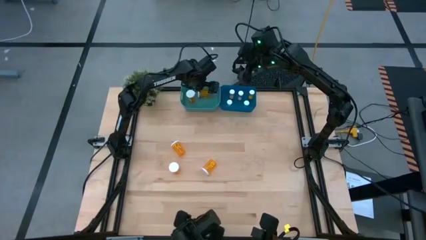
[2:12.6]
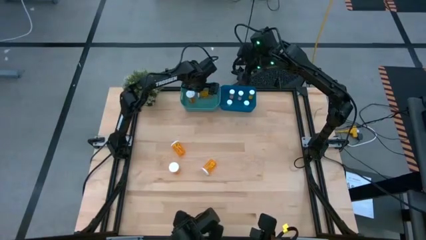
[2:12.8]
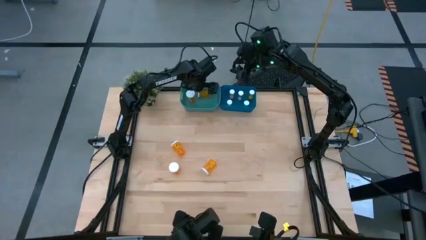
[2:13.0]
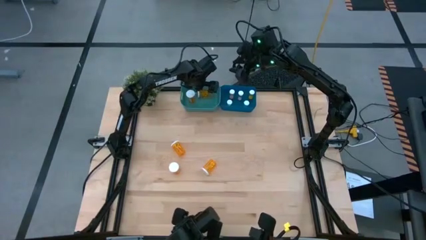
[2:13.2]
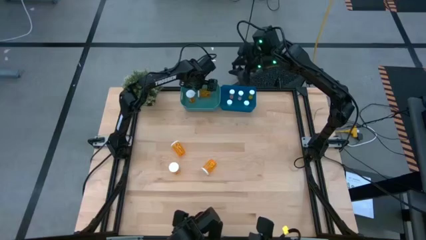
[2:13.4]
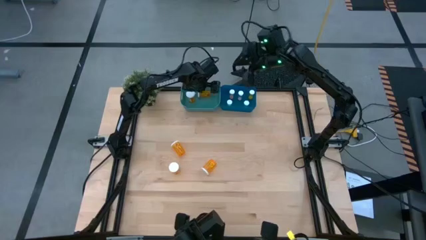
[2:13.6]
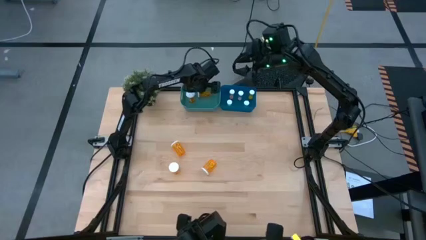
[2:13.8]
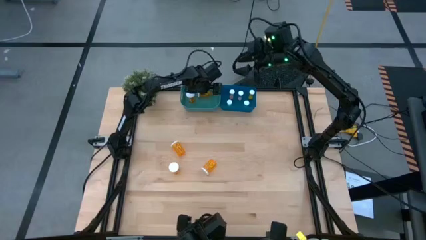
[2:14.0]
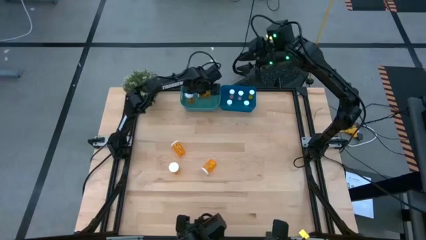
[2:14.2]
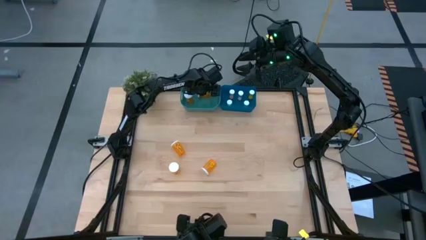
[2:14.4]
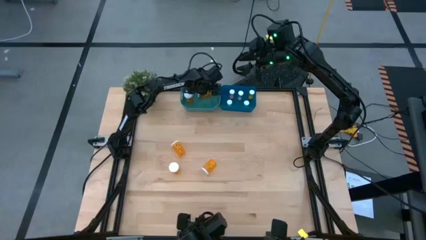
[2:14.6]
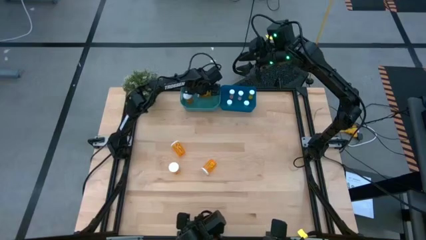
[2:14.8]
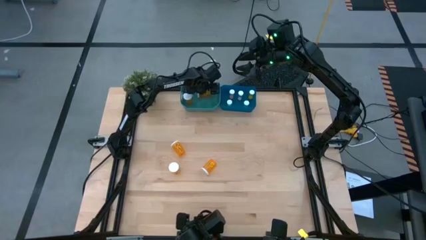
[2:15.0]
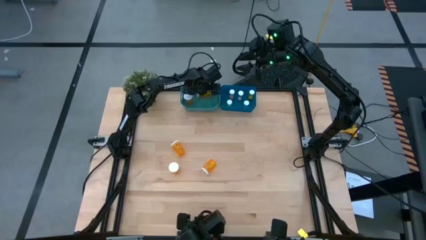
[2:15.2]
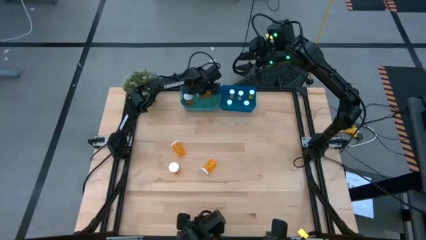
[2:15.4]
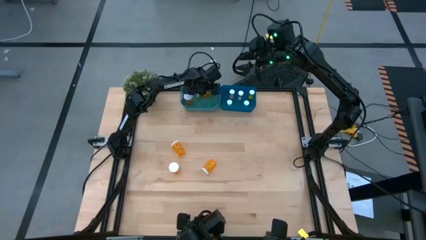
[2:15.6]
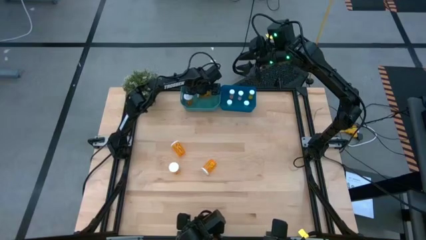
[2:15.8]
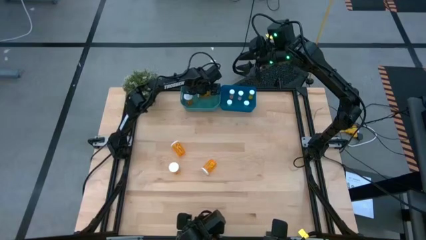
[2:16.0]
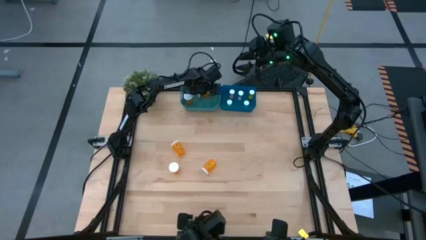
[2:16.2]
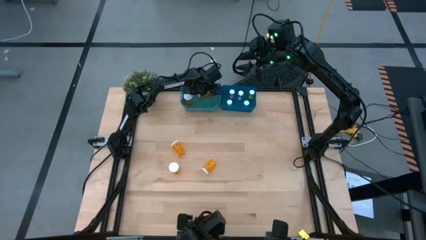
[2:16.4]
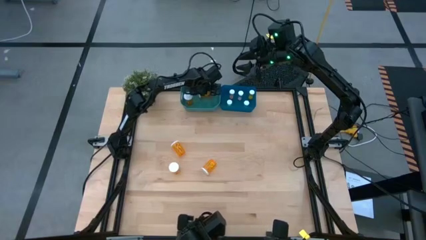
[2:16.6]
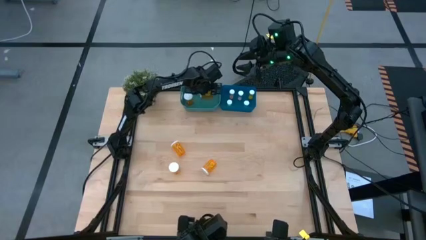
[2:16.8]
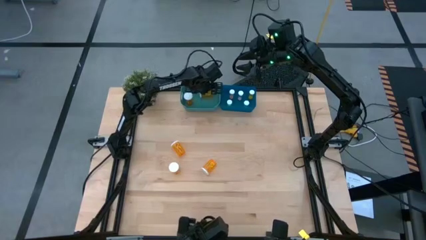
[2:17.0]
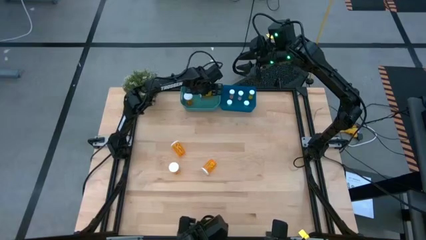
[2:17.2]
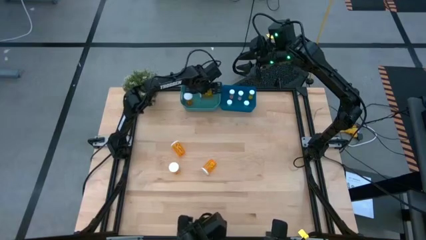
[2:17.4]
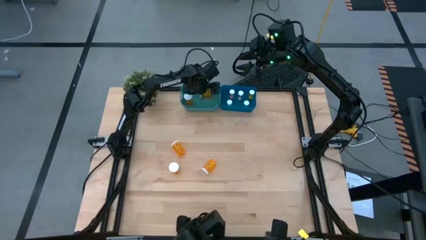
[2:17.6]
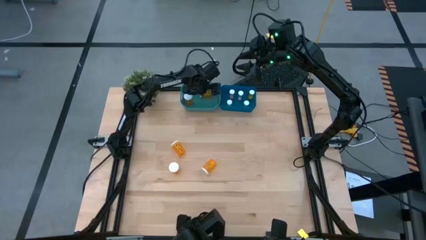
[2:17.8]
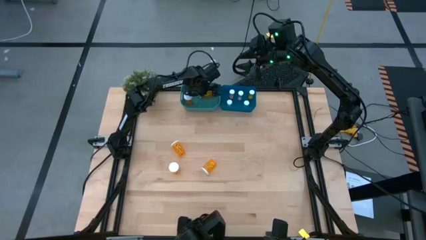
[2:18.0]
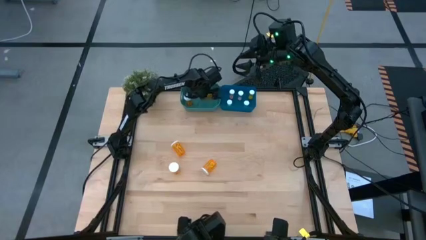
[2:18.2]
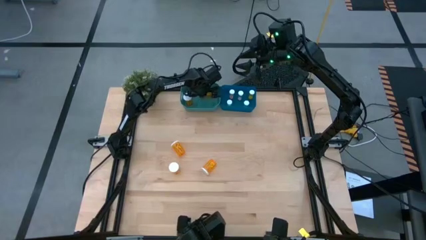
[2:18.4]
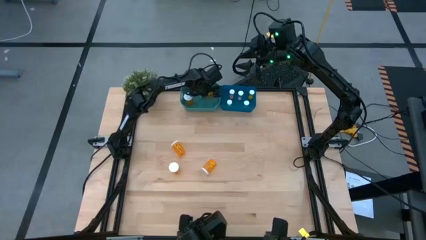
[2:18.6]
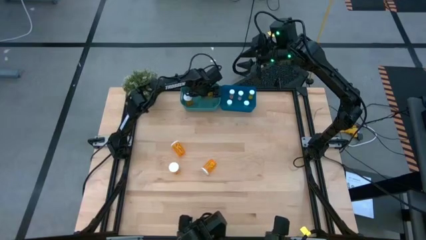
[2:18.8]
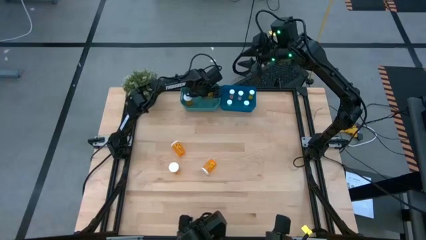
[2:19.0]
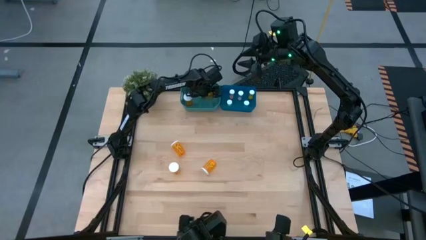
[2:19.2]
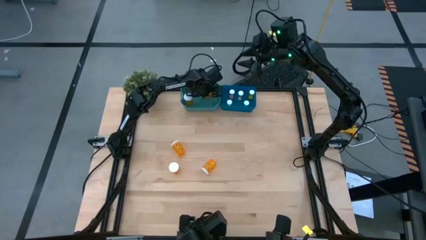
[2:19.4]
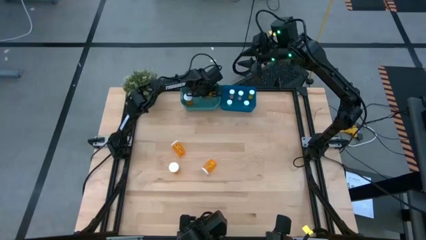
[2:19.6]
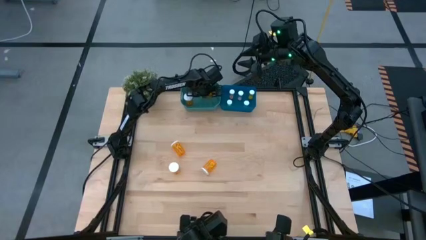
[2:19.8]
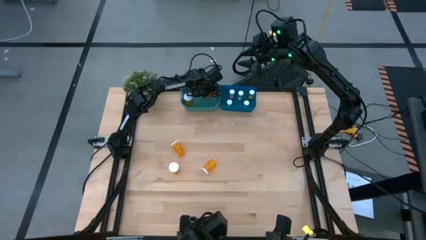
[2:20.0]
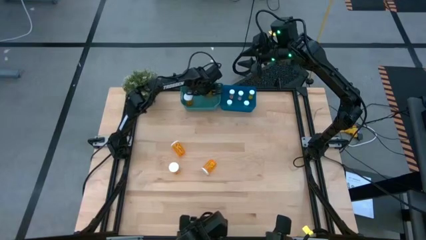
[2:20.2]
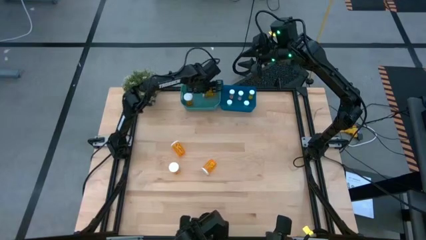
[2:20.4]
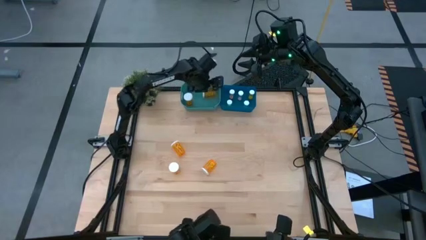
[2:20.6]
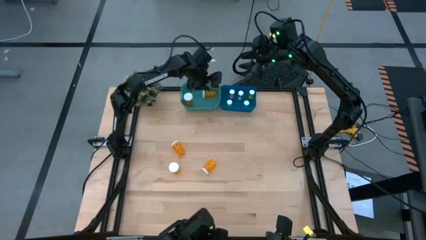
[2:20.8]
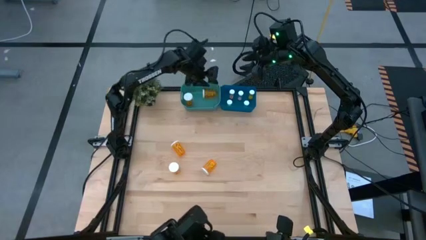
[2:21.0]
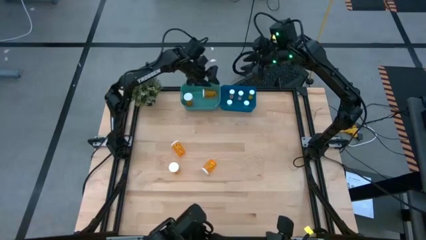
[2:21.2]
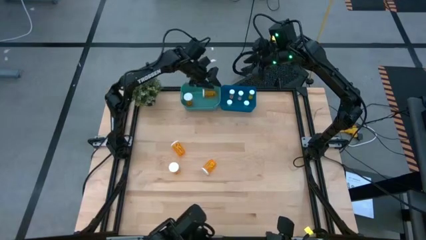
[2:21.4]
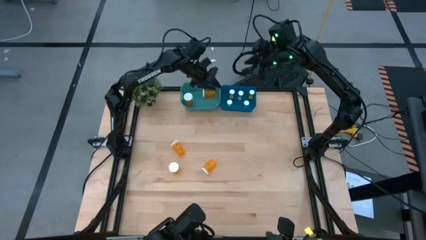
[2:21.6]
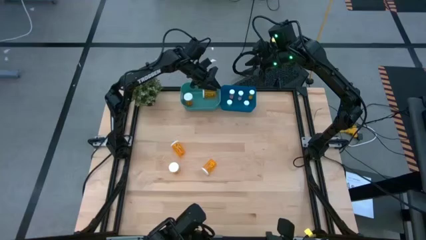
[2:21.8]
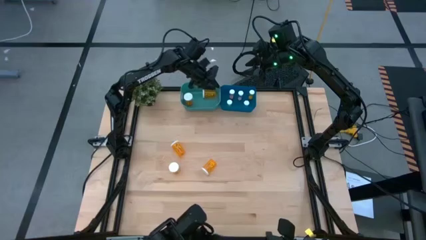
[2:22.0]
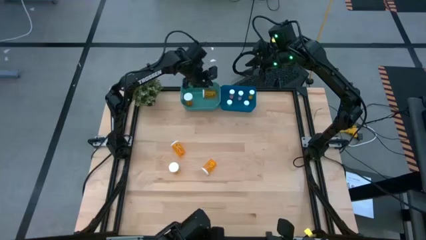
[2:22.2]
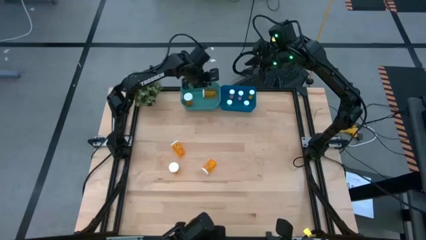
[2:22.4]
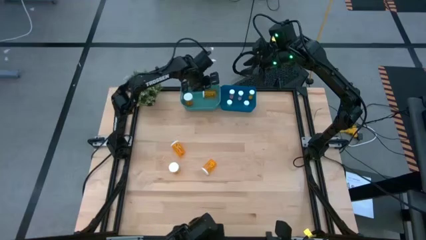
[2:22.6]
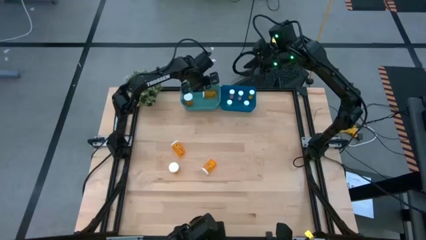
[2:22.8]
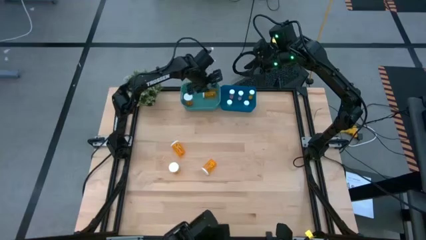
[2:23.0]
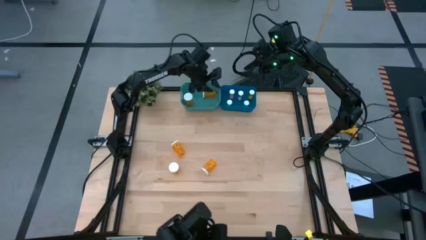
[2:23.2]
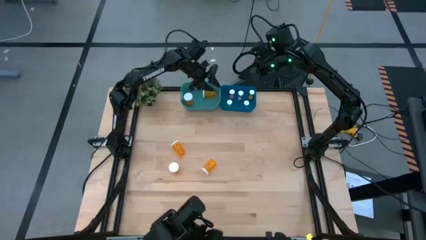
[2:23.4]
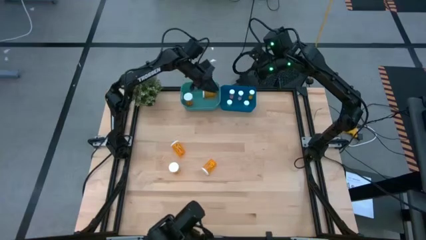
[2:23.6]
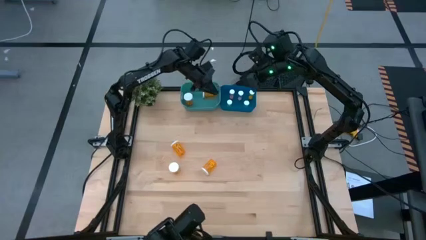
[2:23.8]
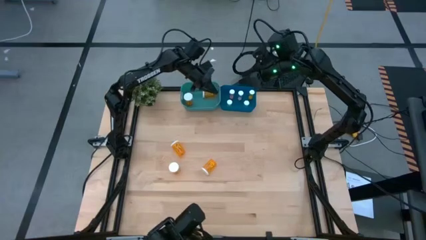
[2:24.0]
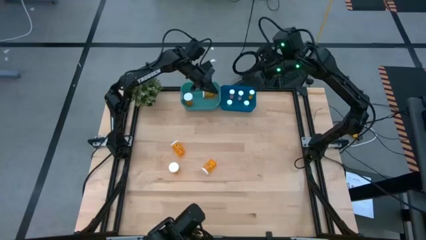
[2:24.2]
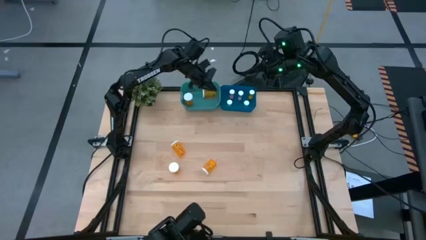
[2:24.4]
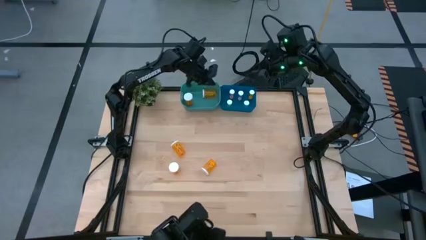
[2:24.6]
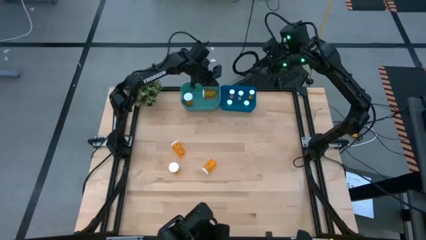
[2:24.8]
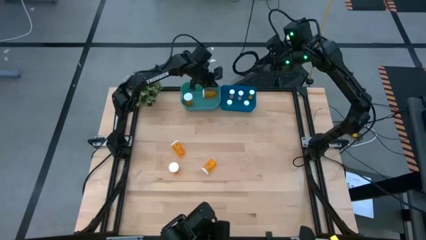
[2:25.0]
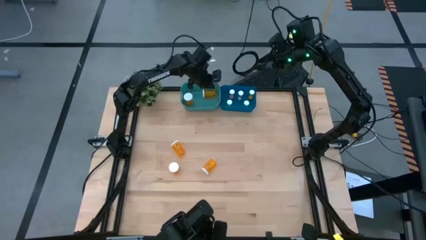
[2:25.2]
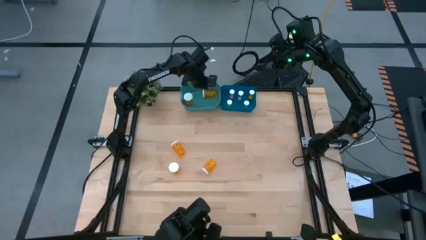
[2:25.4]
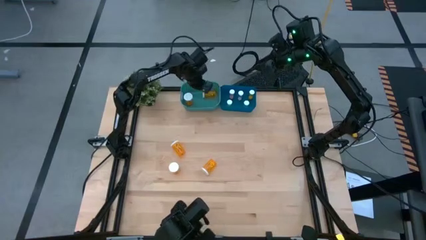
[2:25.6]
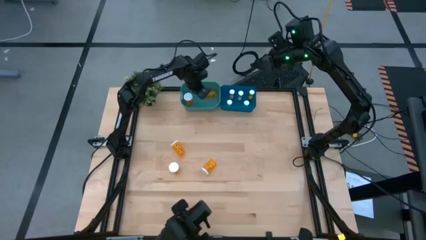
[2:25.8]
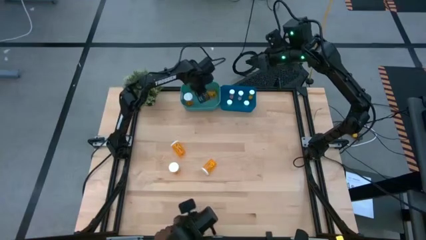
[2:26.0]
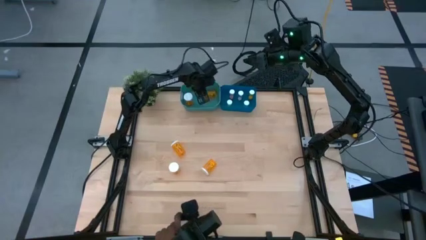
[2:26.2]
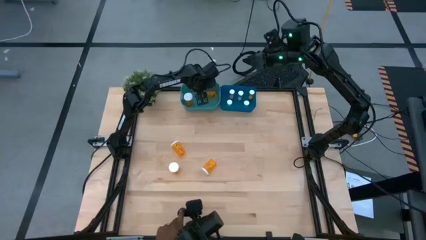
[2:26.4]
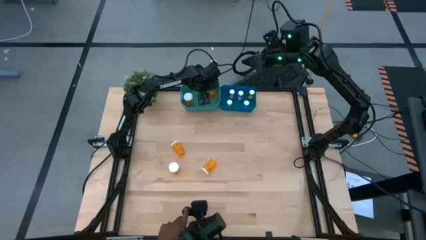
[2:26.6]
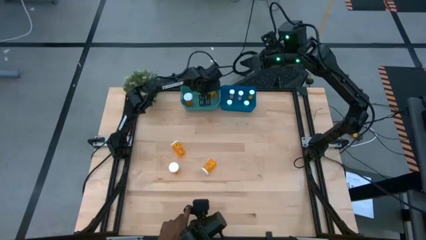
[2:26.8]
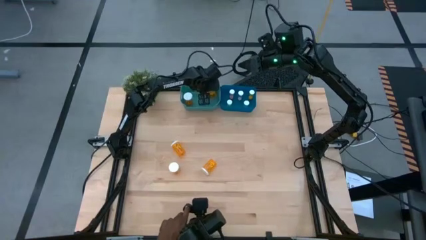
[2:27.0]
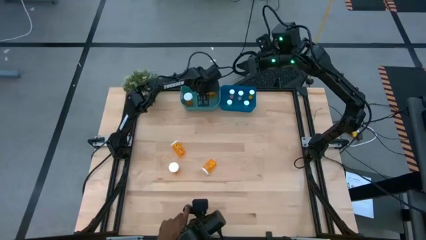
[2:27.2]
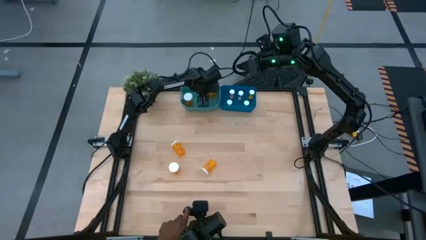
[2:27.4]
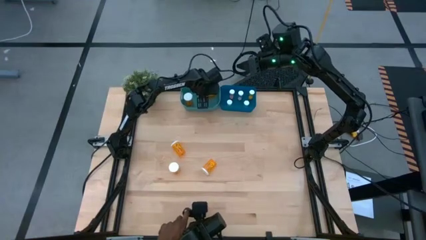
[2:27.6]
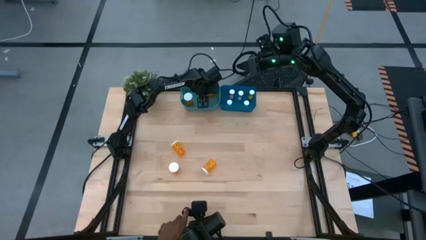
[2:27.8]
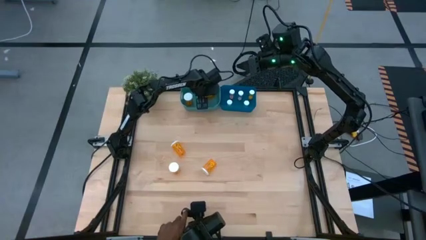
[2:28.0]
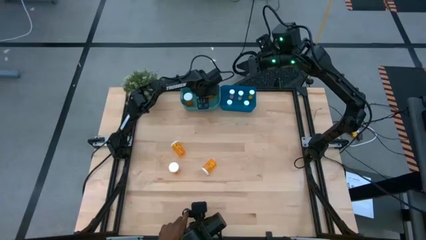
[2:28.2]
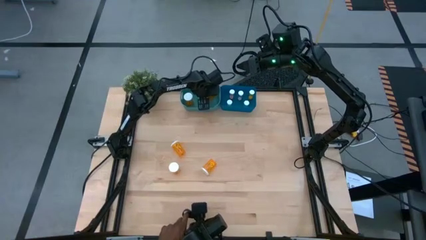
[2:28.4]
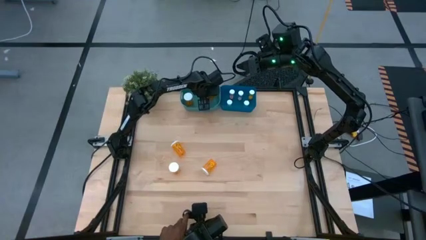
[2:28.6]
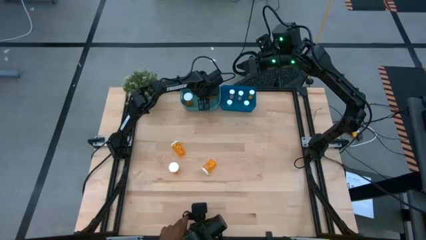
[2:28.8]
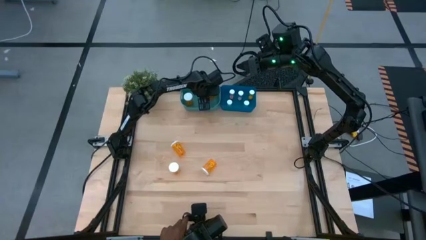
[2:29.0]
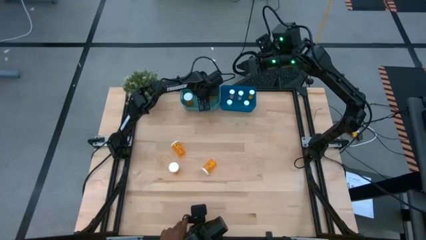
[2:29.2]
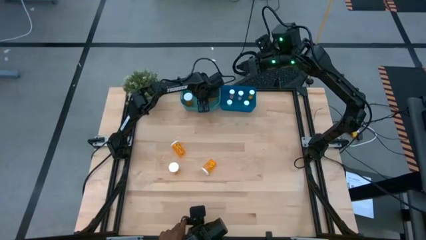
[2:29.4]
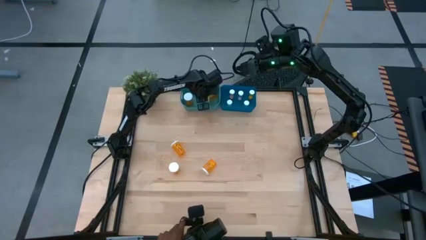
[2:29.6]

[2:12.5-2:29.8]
Task: Pick and place medicine bottles into bin by pill shape (circle, oval)
Put the large orange capsule bottle into the green bin
